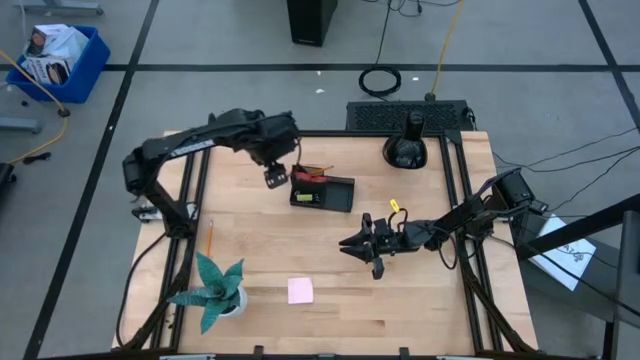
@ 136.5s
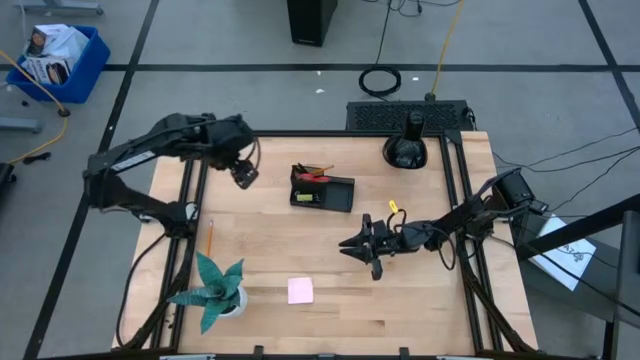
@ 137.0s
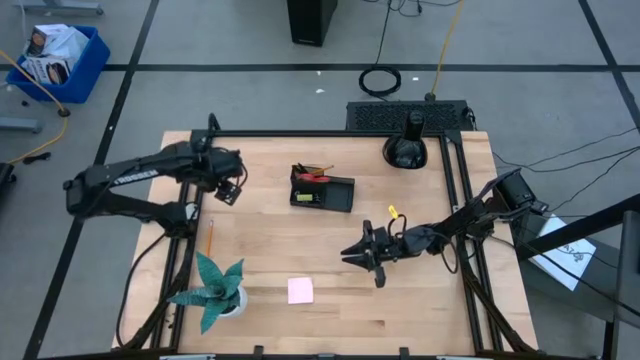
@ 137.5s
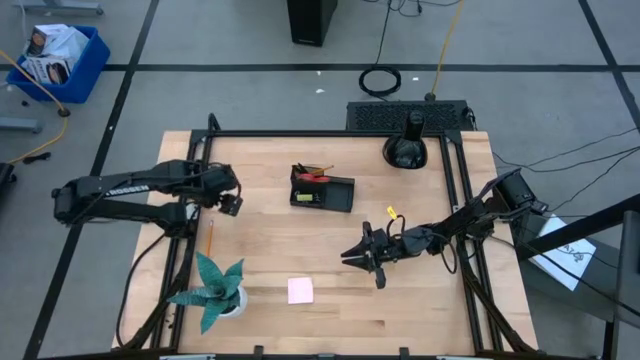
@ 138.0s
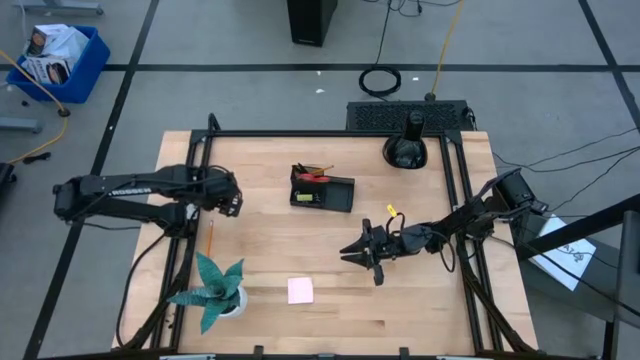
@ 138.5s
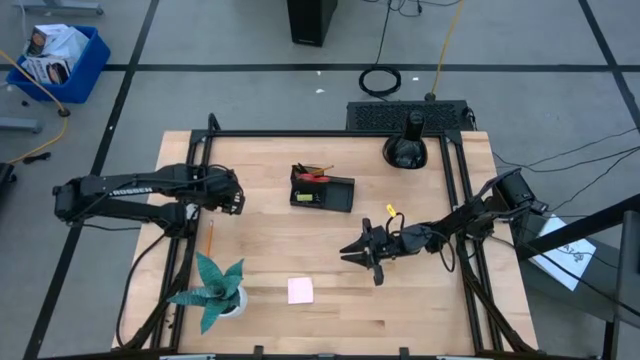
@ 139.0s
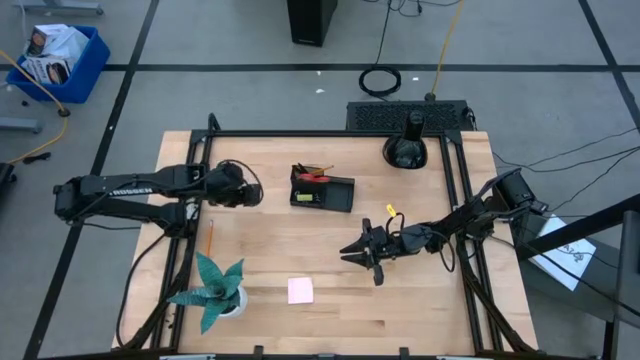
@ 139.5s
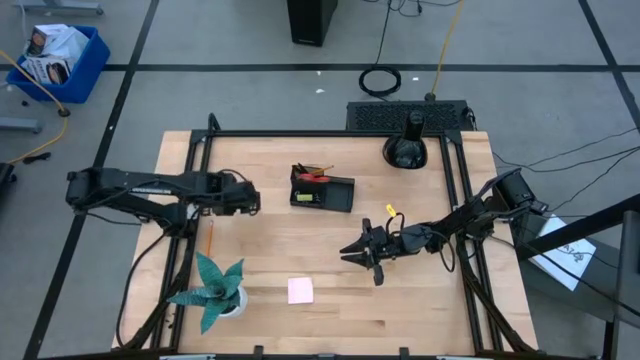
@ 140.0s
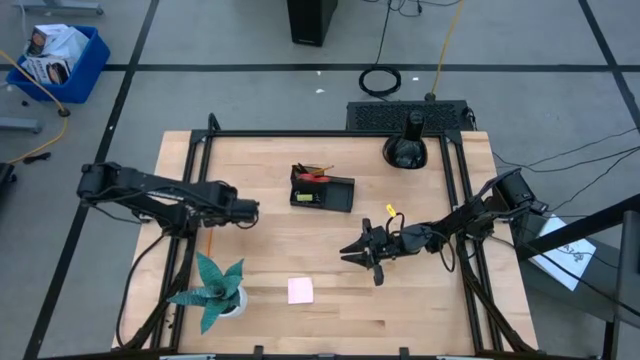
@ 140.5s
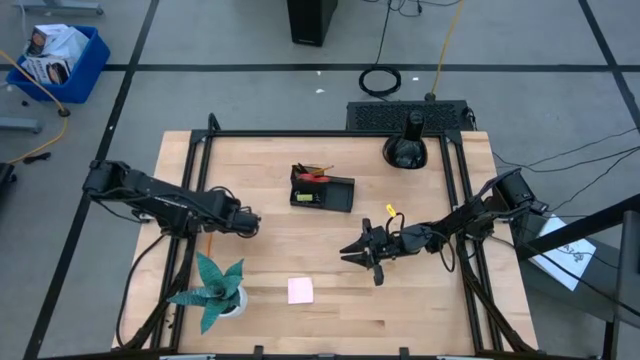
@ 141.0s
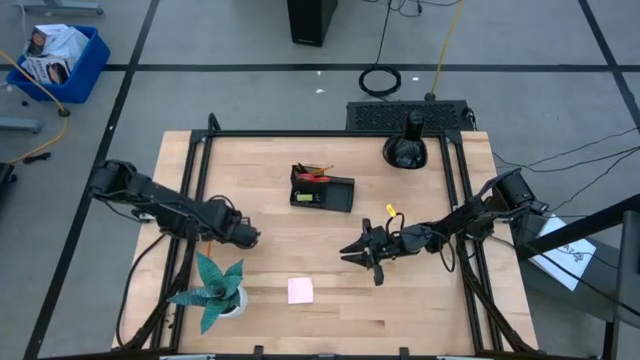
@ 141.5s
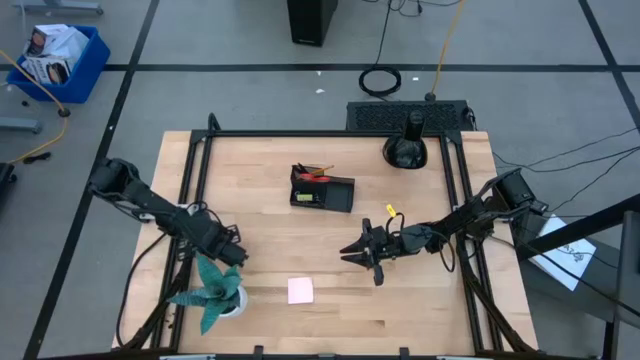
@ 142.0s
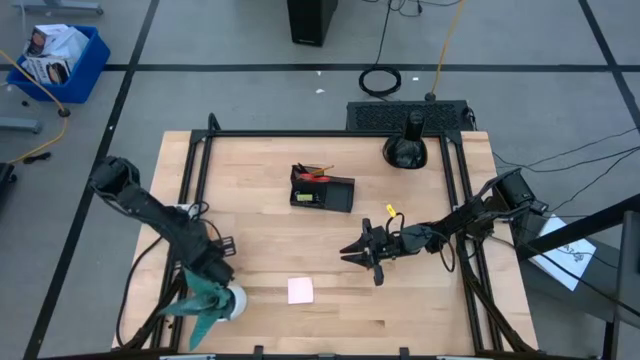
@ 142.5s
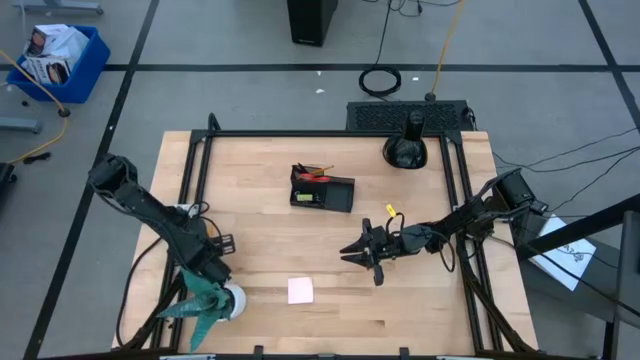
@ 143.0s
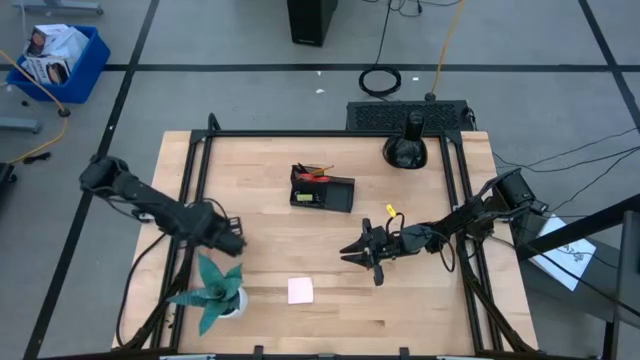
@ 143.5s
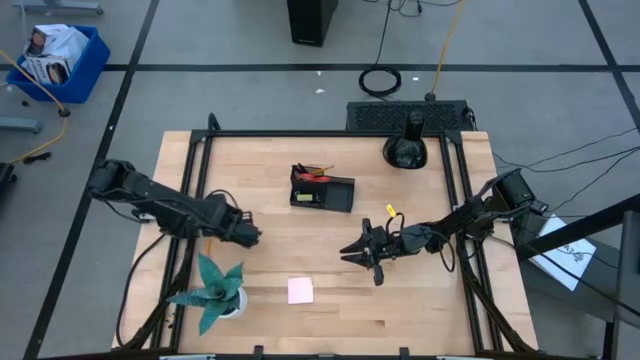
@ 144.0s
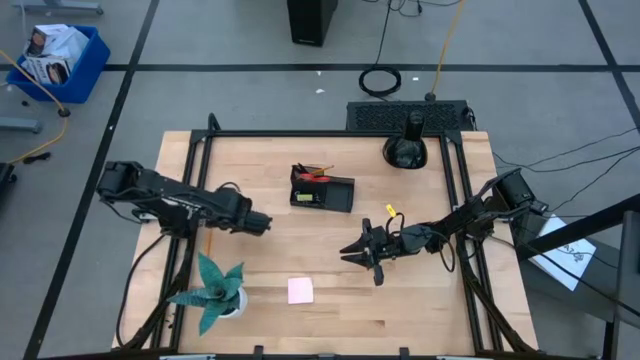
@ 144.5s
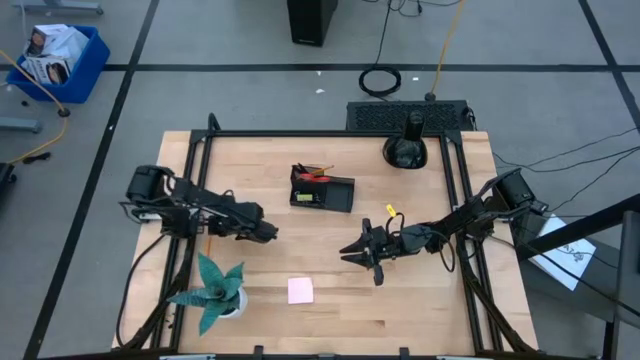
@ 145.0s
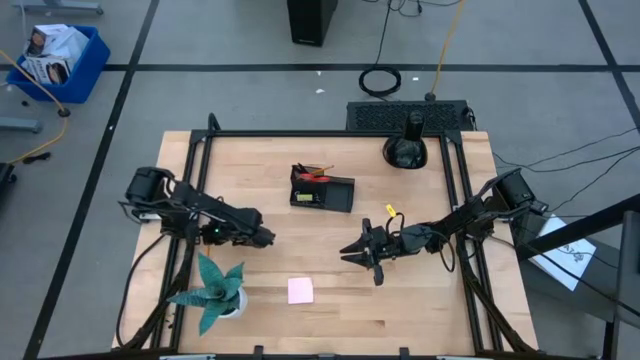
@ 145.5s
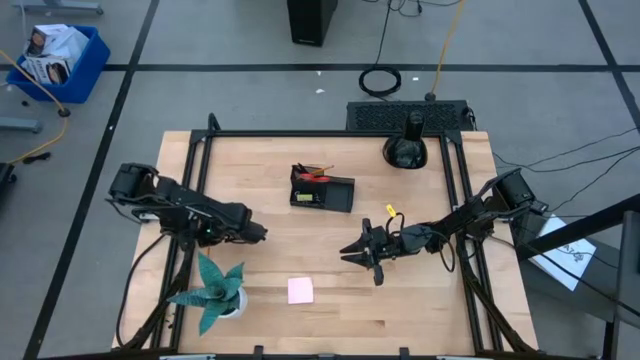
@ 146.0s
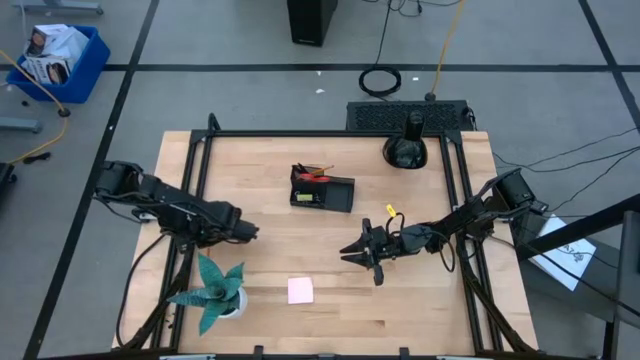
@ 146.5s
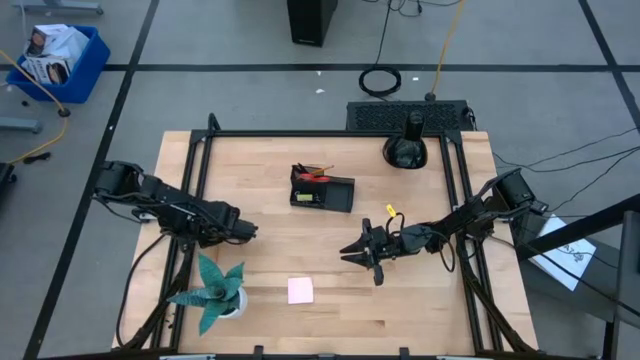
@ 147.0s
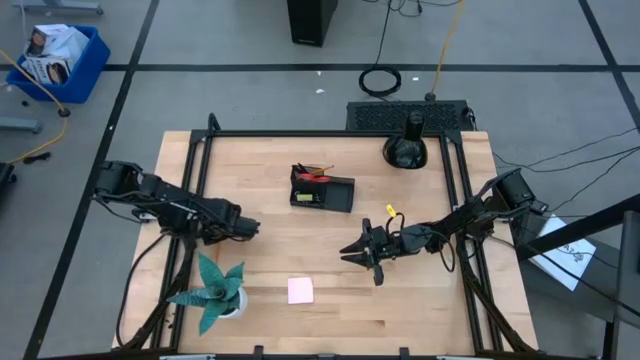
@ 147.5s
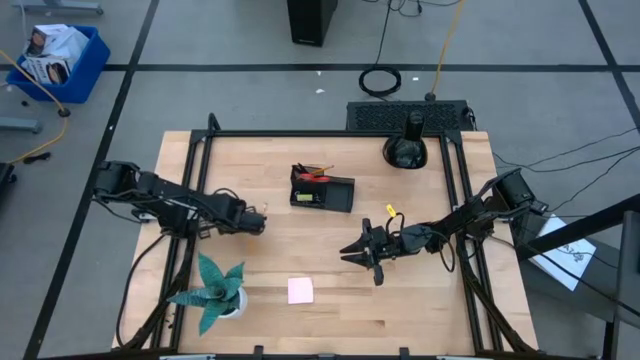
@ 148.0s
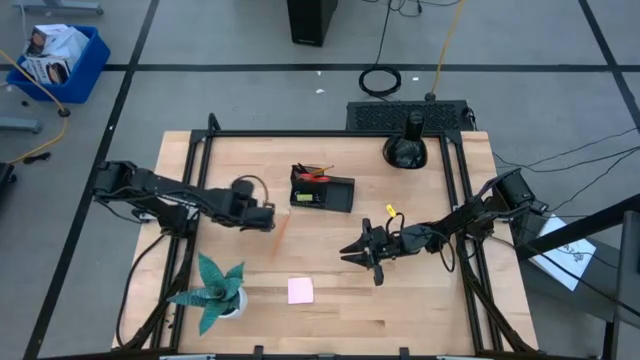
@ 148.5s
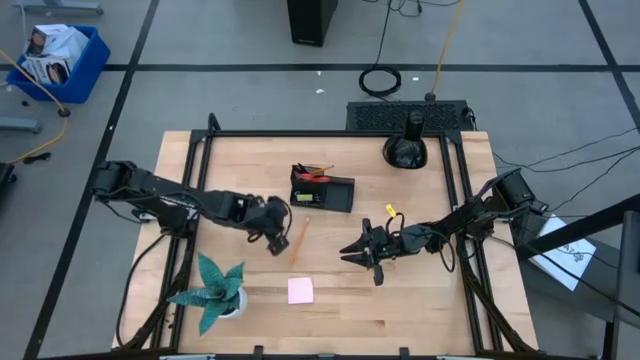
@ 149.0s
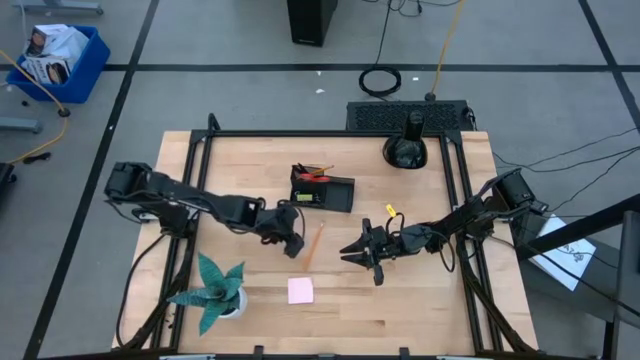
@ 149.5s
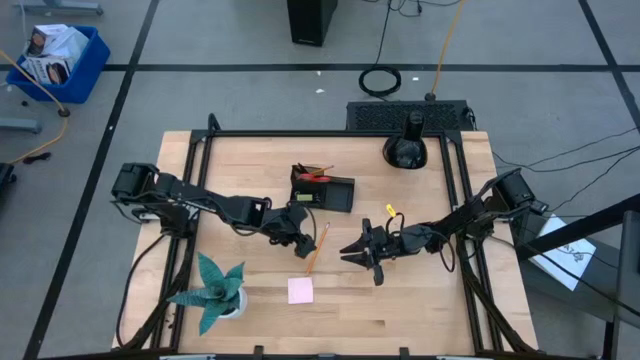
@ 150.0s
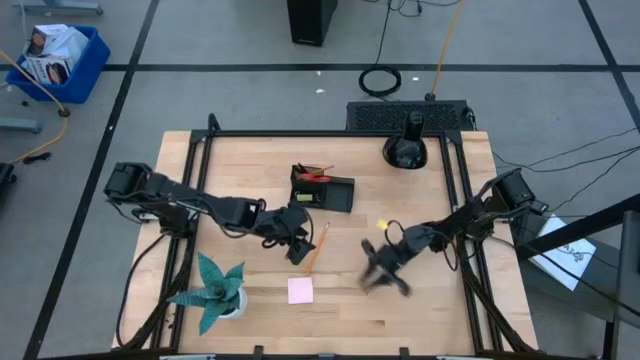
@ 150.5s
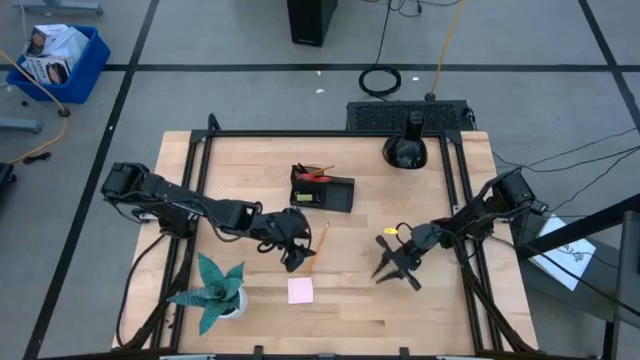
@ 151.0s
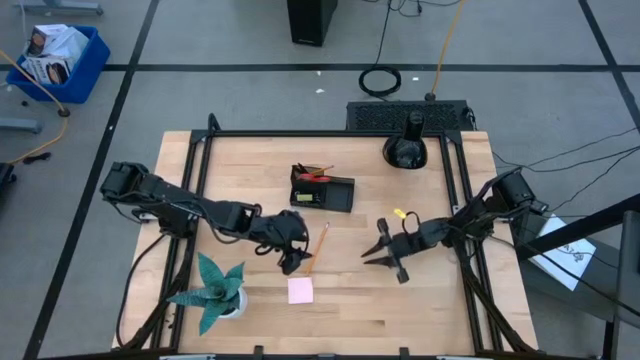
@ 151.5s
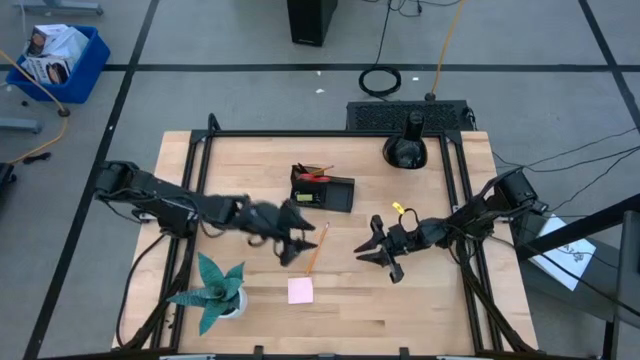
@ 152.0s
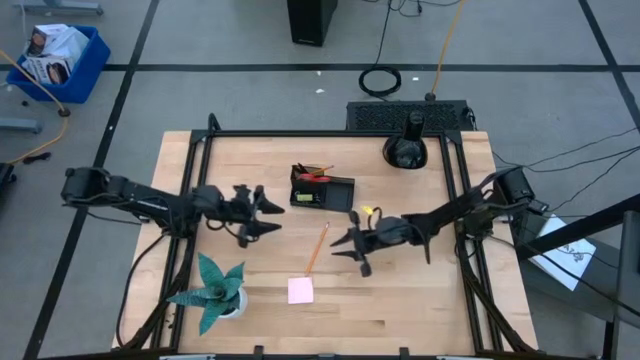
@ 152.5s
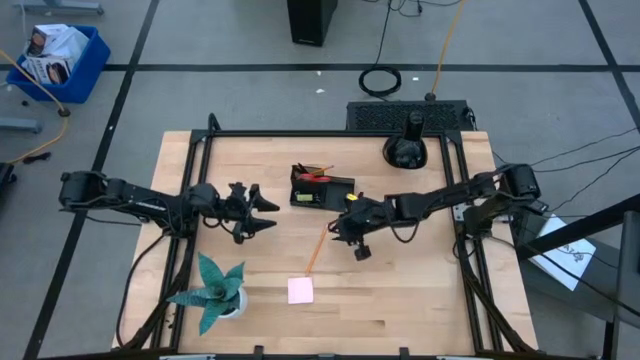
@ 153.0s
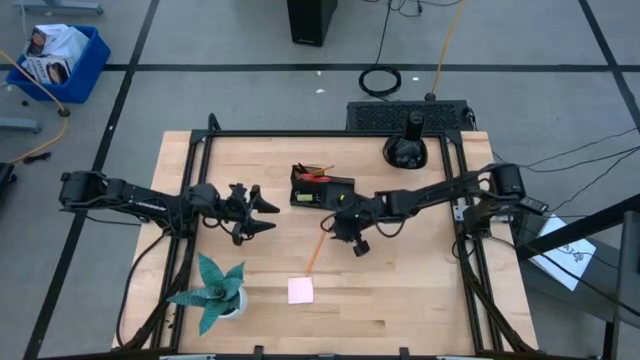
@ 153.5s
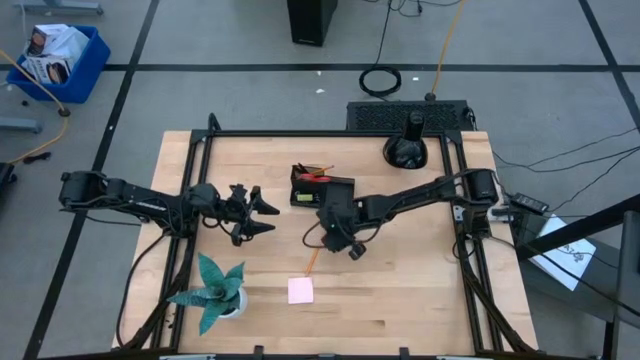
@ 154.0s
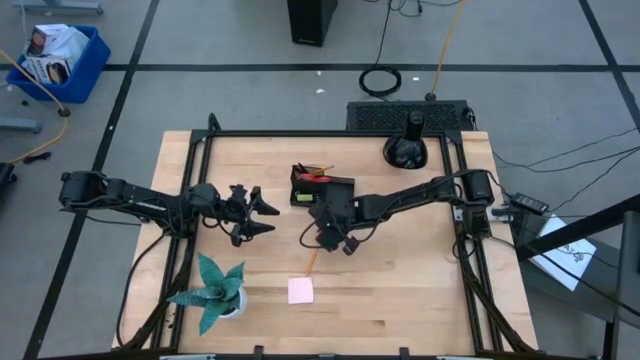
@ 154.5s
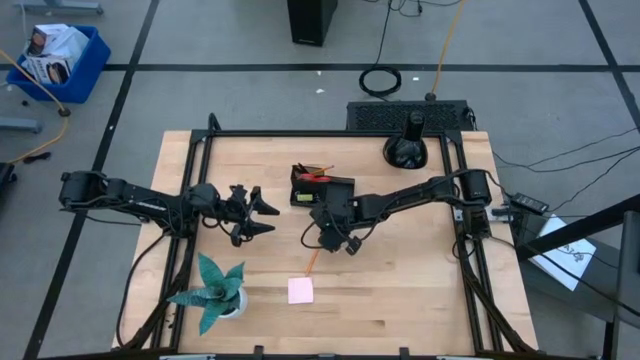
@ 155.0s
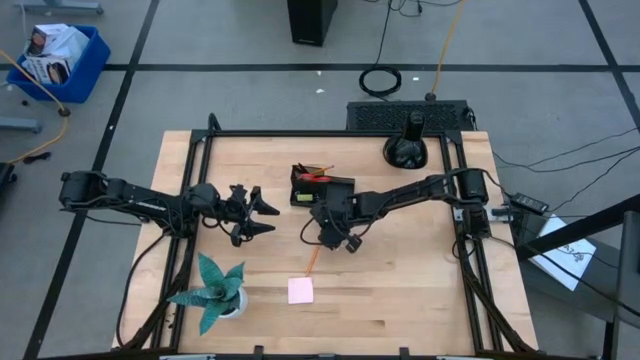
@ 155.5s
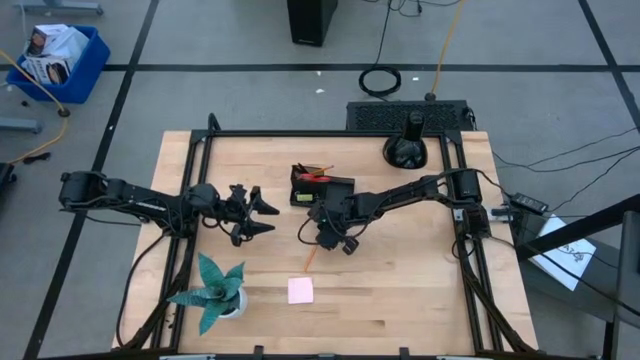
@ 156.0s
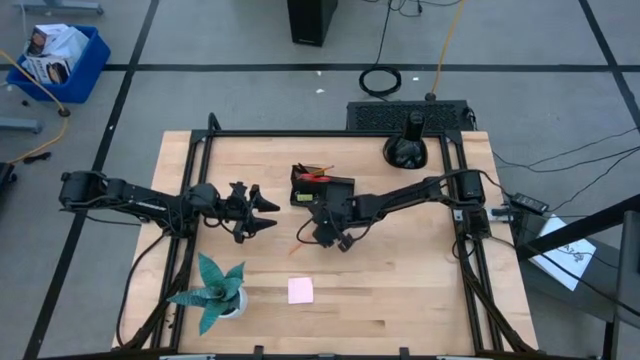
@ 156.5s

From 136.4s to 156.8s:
Task: Pick and place office supplies into organizer
Put the orange pencil into the black desk organizer

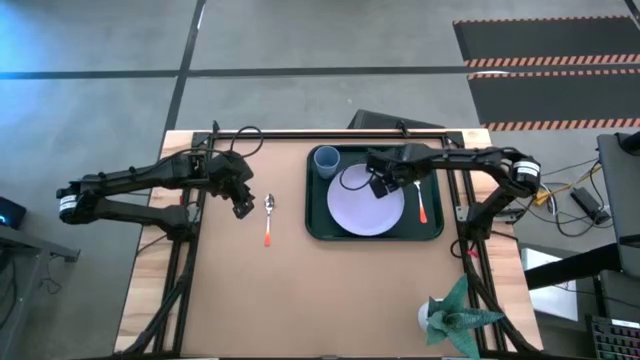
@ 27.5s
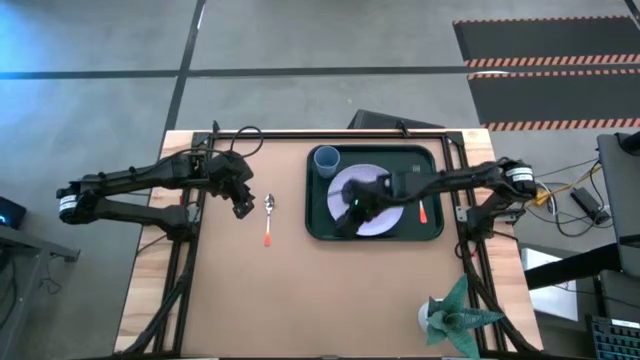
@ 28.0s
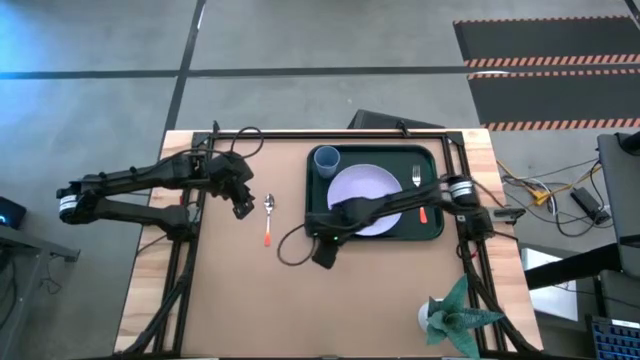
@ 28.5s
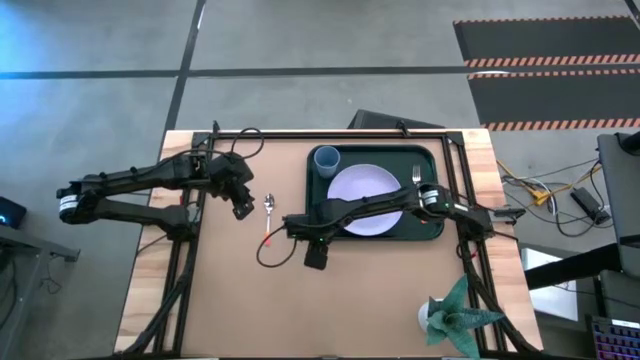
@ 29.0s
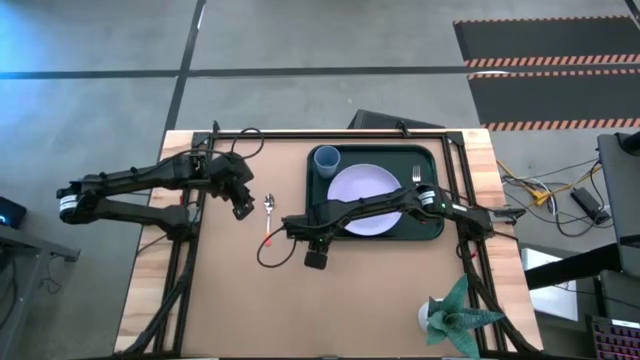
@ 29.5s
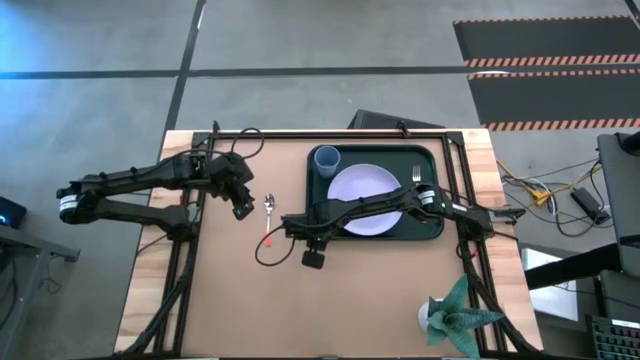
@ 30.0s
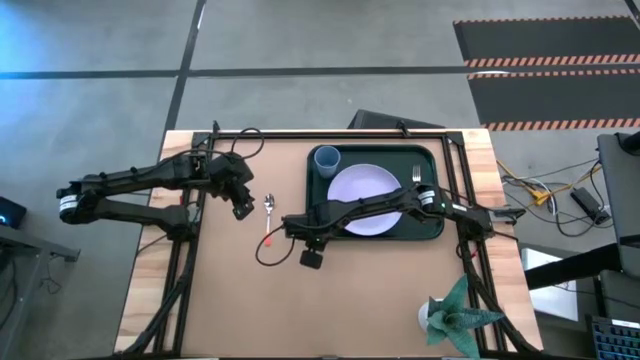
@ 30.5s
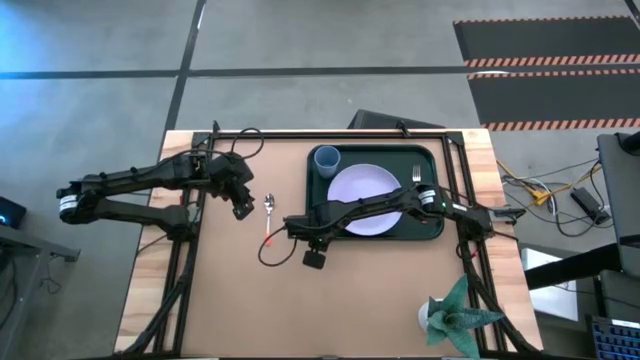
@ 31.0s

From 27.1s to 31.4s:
Task: Pick and place plate/cup/fork/spoon on tray
Move the black tray to the center of the table
